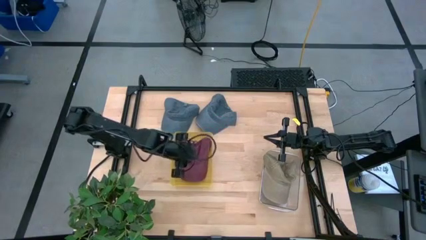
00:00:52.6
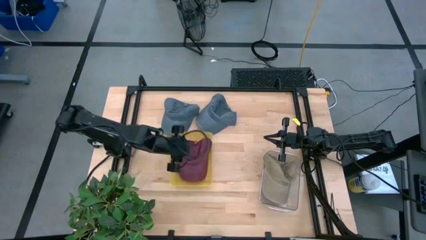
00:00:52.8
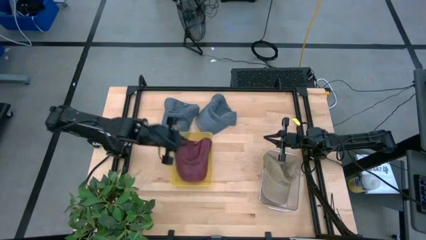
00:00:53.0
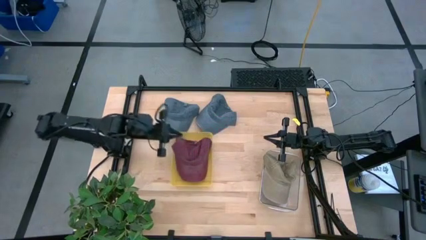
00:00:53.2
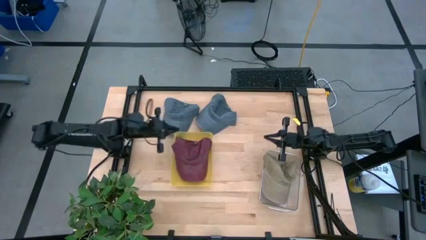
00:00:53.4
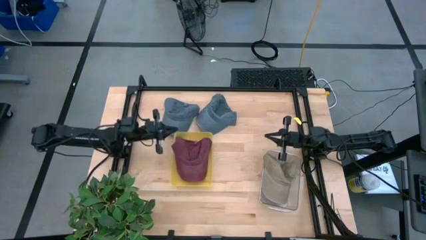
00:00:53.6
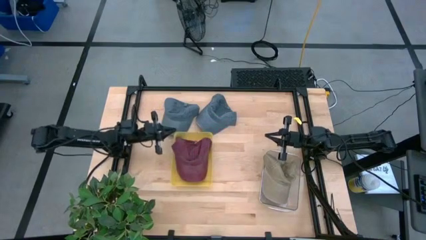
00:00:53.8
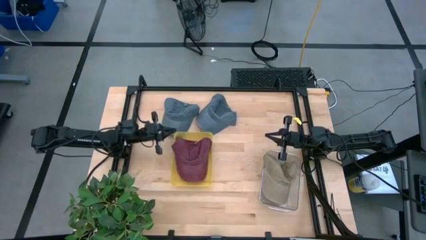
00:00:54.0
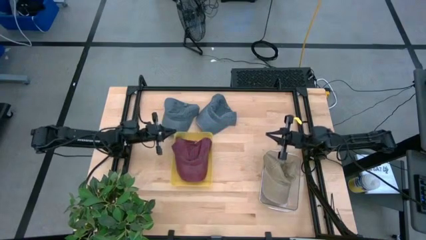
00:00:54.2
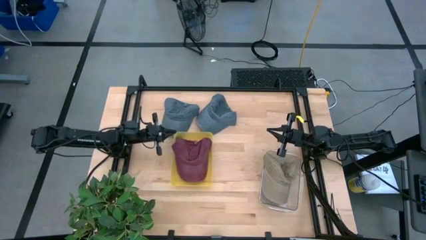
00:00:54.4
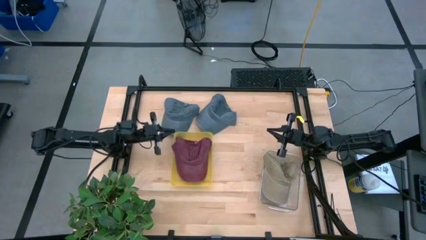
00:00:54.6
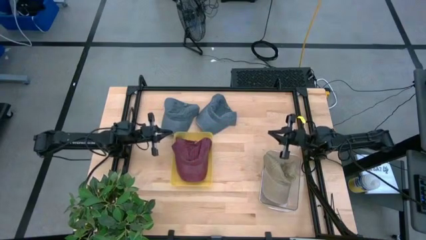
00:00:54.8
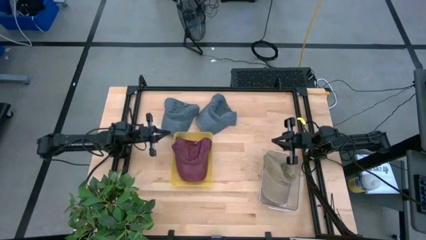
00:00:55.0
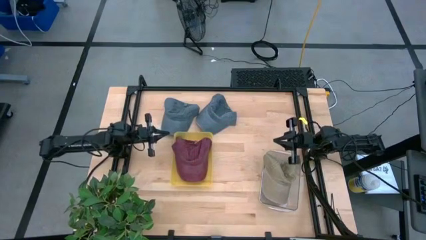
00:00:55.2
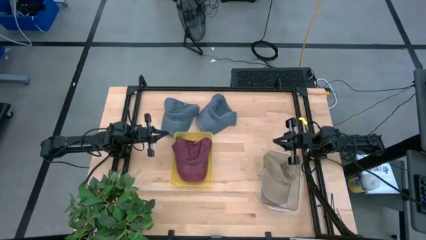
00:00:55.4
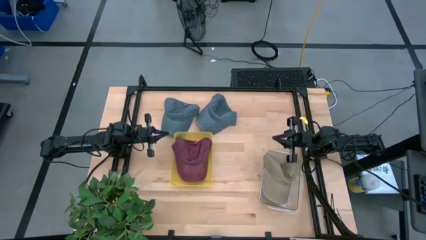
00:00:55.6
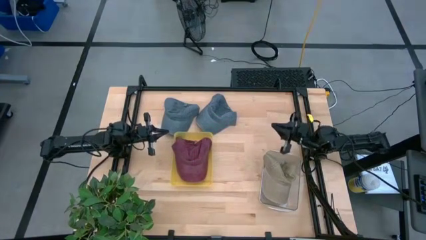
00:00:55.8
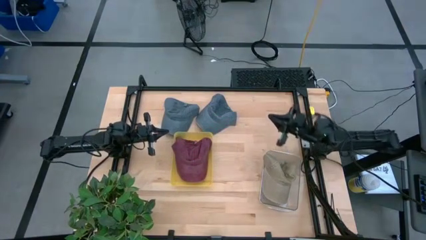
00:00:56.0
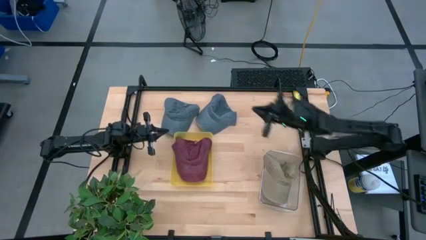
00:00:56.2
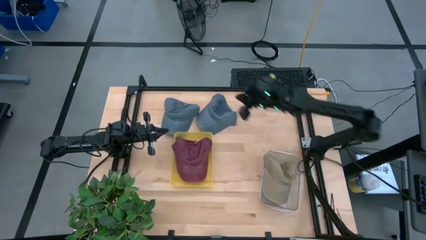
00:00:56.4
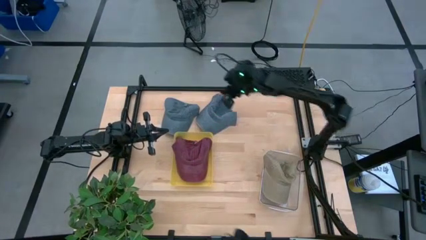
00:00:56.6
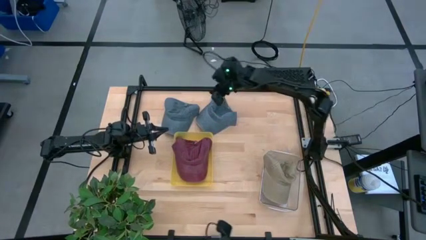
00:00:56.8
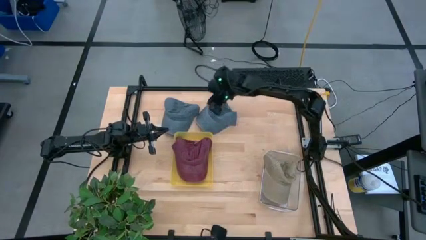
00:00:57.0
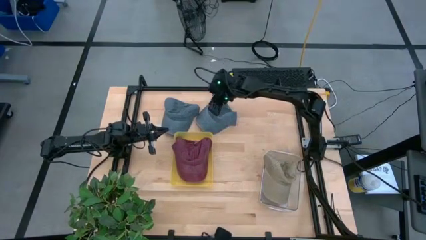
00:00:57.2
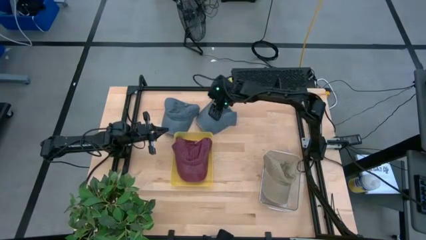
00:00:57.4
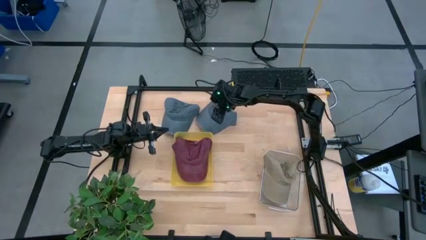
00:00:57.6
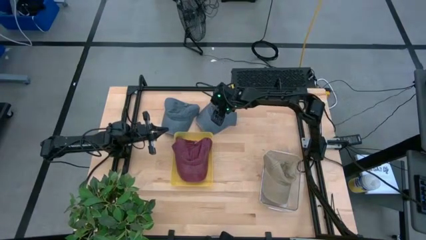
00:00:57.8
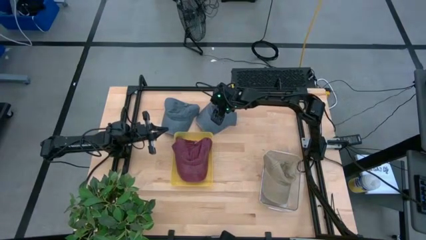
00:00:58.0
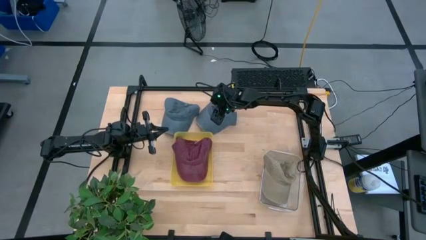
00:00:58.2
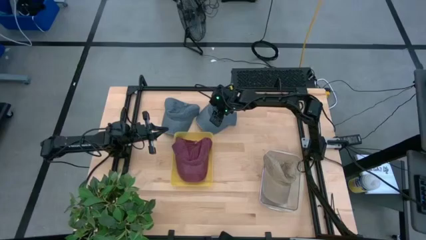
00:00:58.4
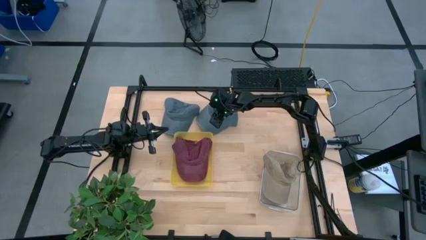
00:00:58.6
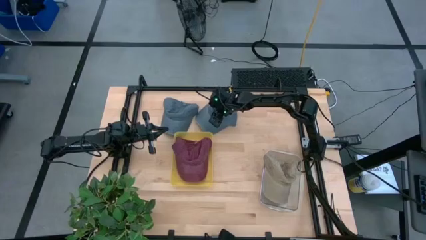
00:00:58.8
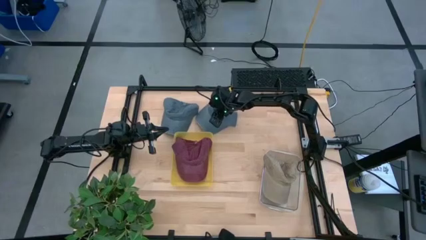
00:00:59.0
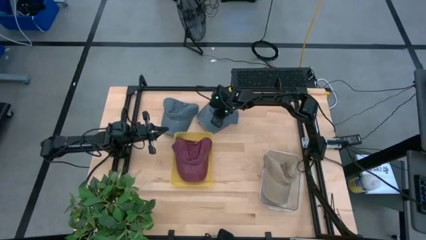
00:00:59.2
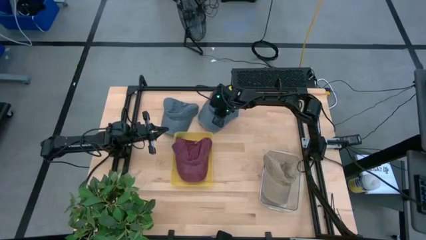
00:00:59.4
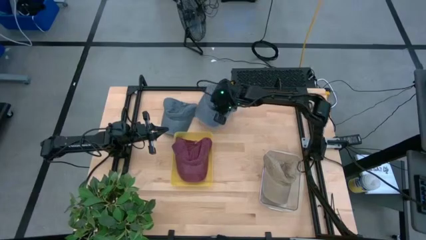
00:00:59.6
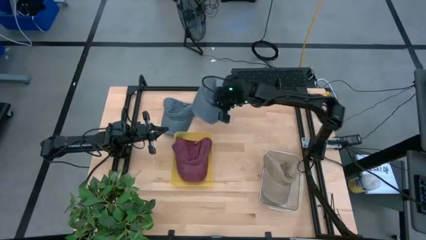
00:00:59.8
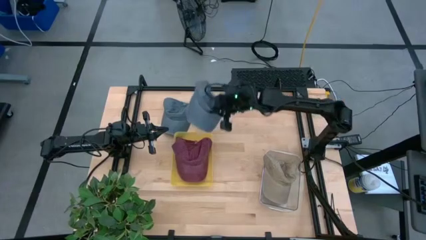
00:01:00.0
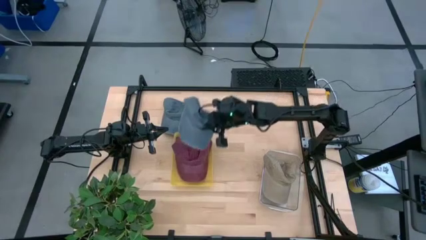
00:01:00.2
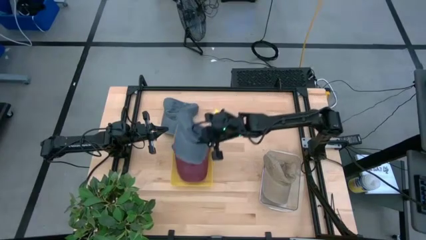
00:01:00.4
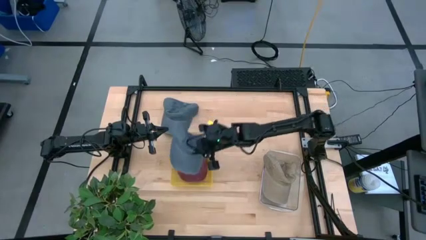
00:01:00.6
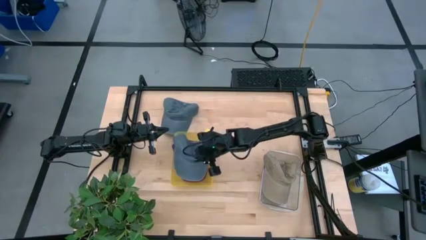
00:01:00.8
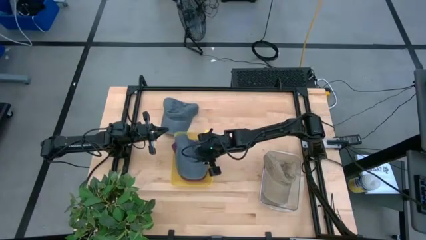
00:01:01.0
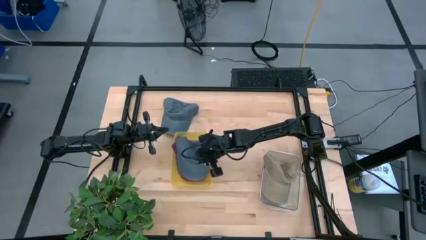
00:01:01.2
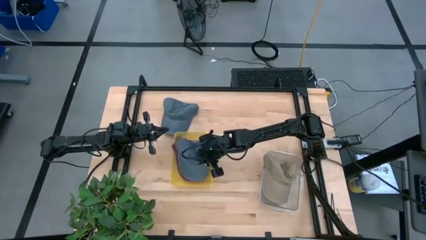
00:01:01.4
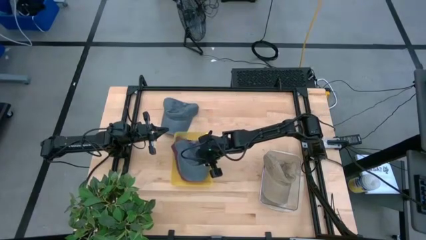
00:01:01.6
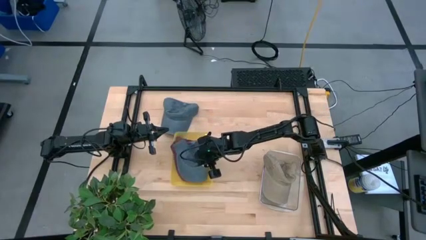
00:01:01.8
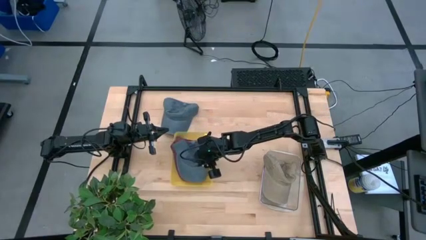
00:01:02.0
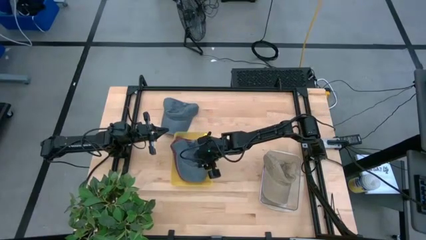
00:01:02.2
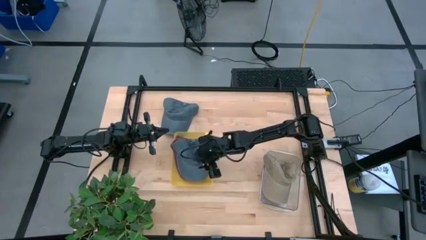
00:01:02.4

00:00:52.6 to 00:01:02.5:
Task: Pick & Place hat
Put the right blue cap into the yellow bin

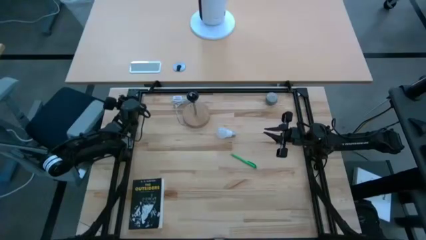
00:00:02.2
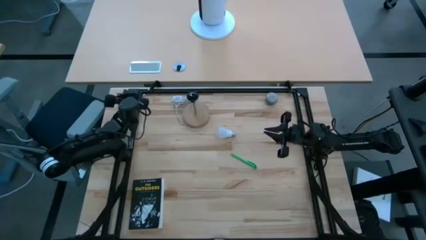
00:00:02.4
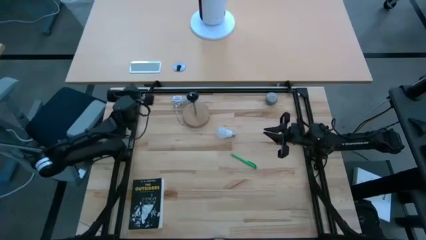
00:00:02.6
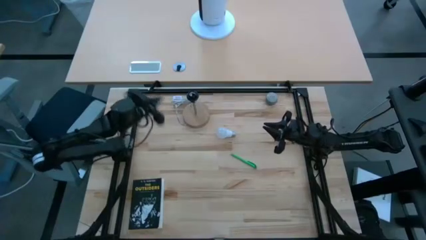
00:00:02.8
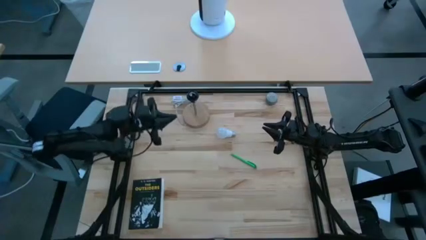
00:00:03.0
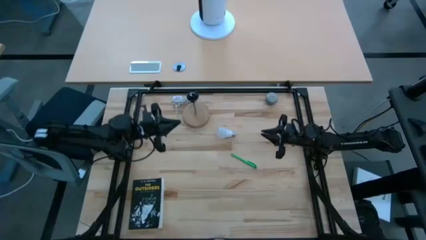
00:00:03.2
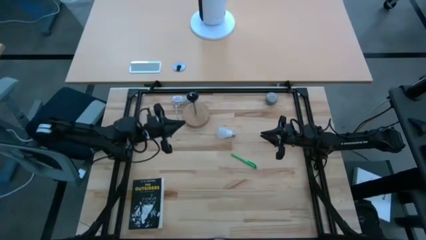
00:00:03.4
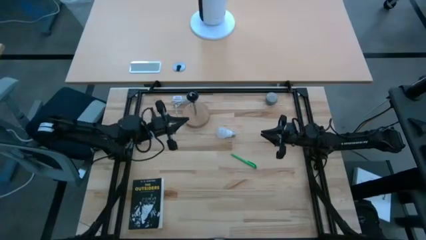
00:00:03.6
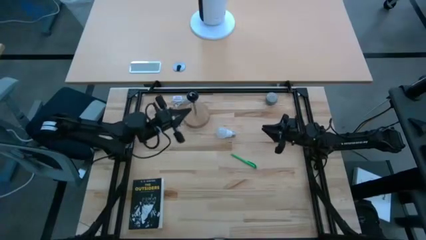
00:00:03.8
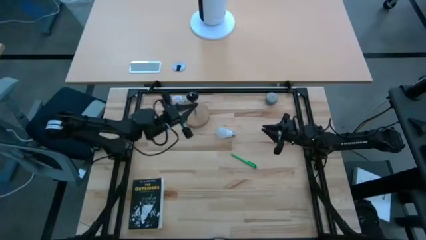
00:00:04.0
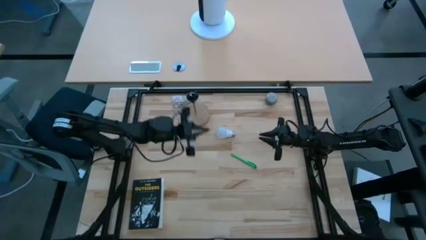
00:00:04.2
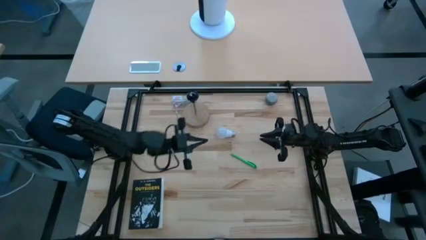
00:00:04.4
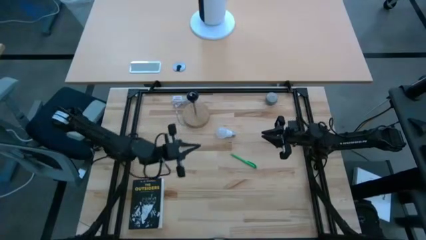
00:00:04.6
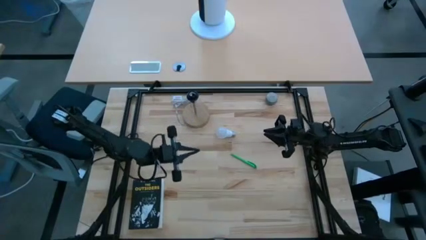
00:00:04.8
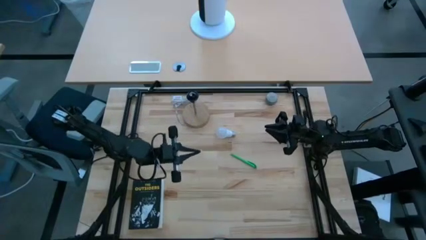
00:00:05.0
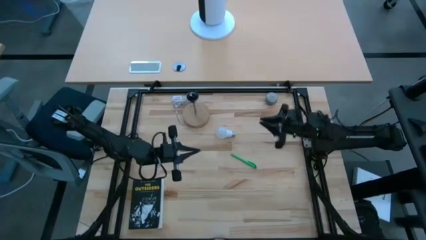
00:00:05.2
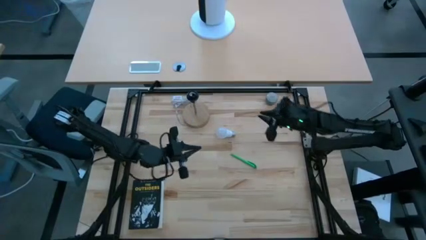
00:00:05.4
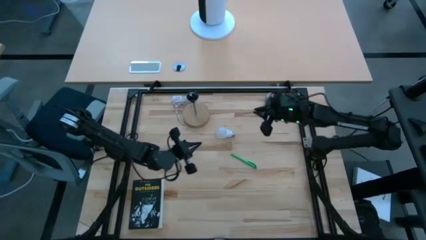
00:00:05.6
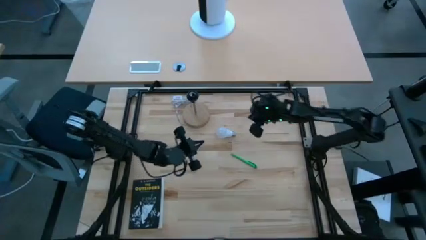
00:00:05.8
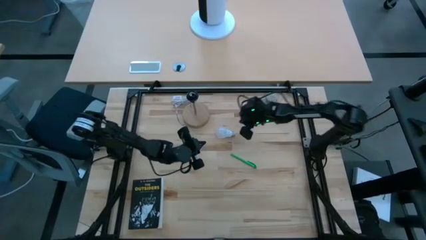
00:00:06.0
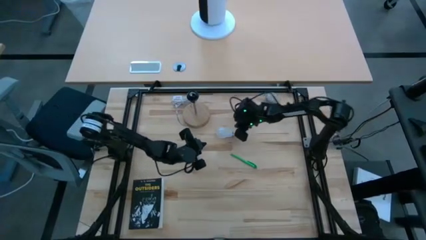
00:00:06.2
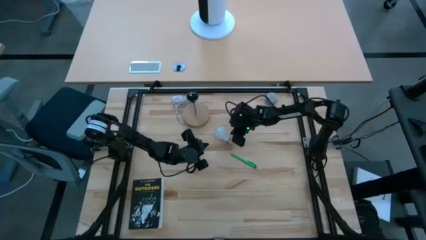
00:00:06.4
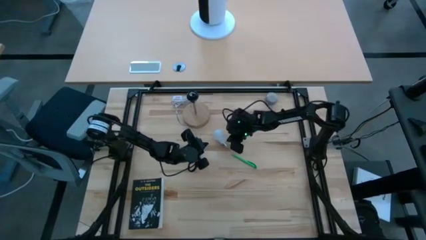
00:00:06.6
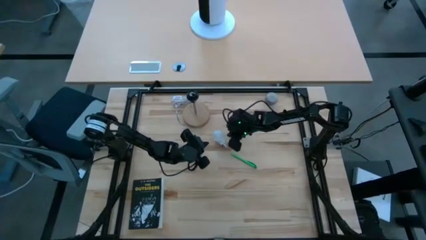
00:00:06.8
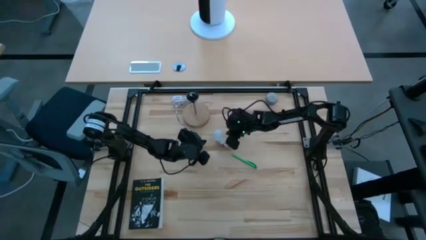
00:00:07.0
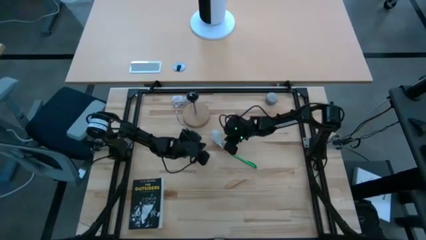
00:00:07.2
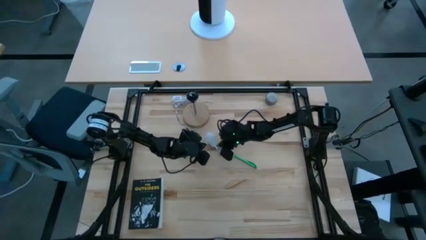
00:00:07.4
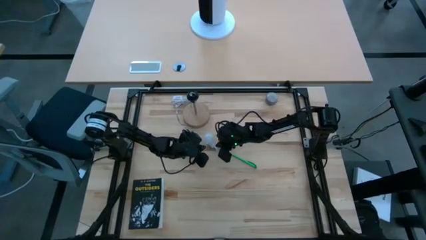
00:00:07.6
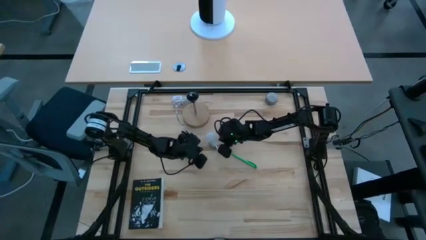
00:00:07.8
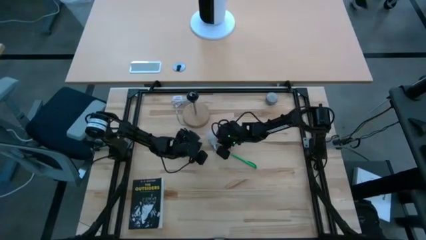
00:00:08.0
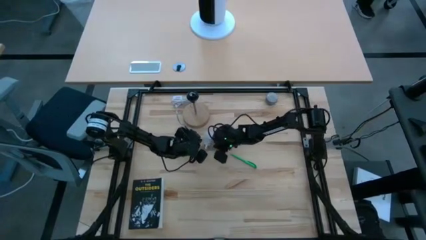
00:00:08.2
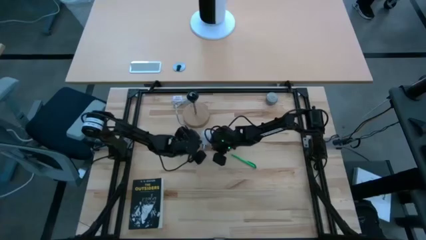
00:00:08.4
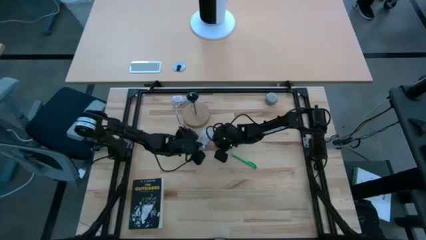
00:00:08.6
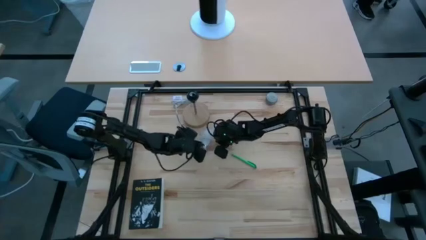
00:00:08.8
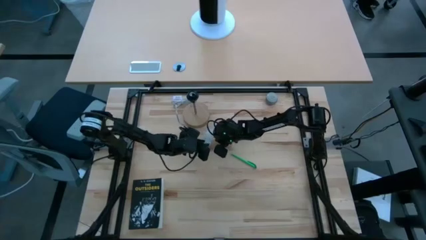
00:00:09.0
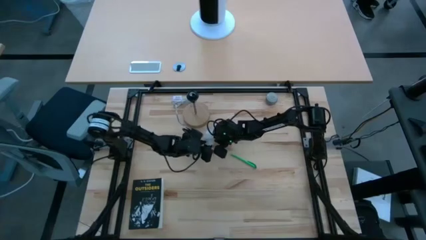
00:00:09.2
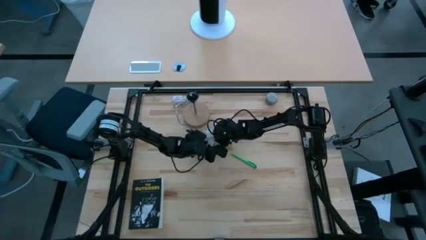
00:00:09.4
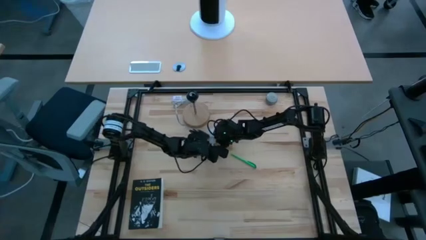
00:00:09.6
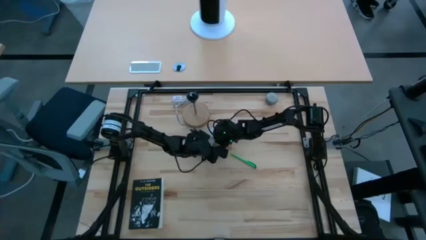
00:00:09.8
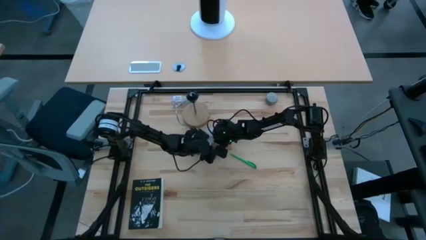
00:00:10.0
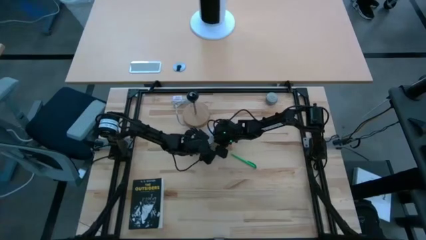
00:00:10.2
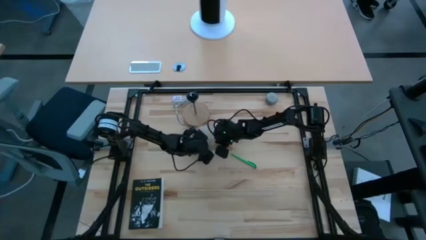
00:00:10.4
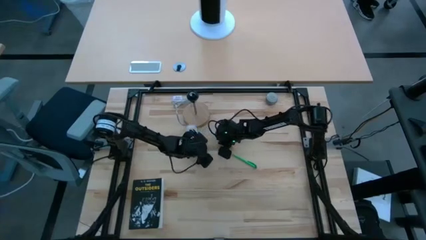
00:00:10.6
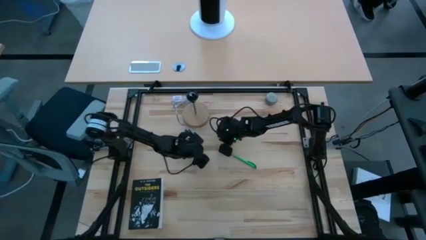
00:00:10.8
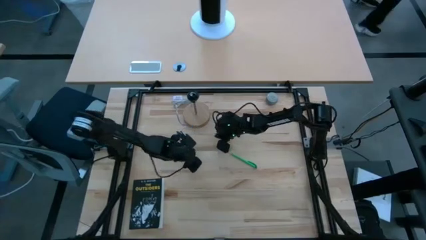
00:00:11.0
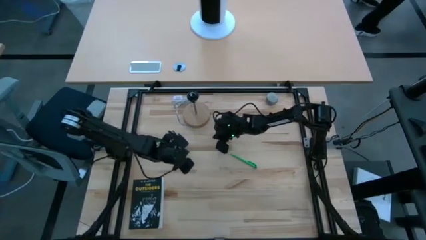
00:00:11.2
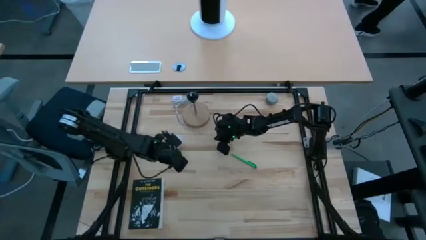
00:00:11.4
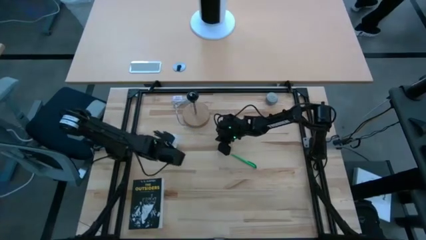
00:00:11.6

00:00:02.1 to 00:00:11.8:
Task: Screw lightbulb
Insert the lightbulb into the lamp
